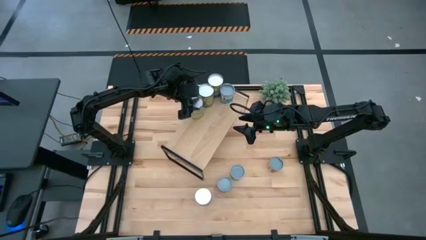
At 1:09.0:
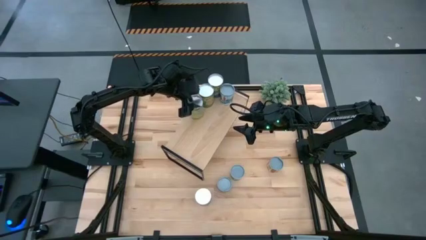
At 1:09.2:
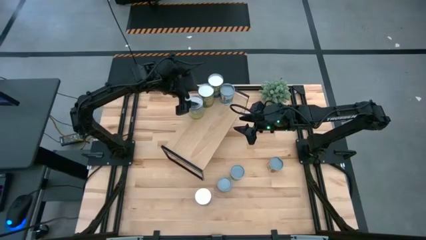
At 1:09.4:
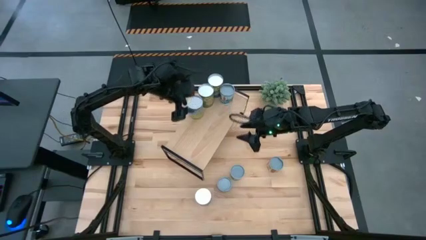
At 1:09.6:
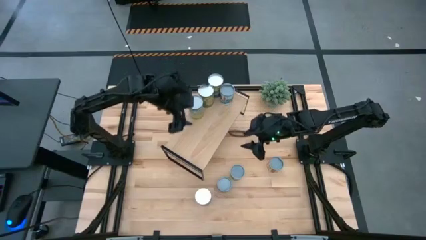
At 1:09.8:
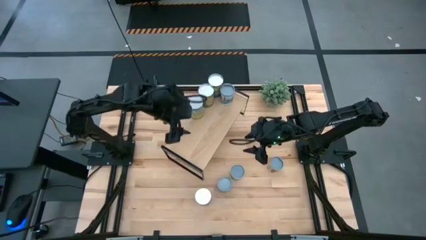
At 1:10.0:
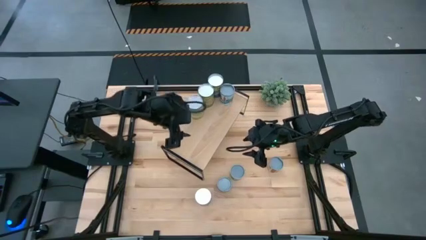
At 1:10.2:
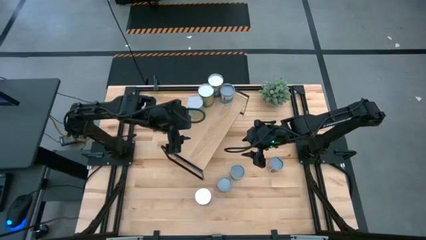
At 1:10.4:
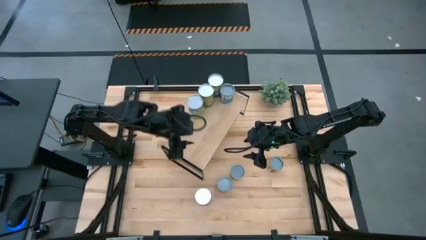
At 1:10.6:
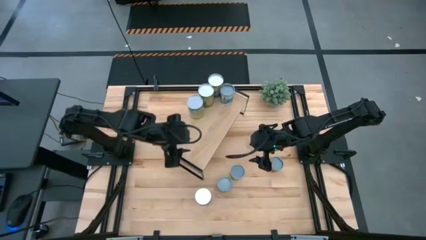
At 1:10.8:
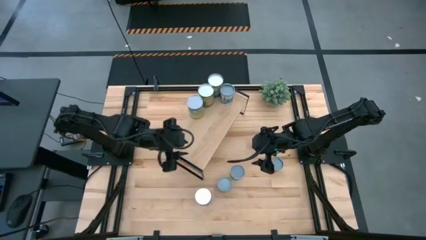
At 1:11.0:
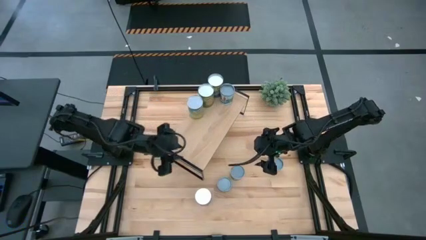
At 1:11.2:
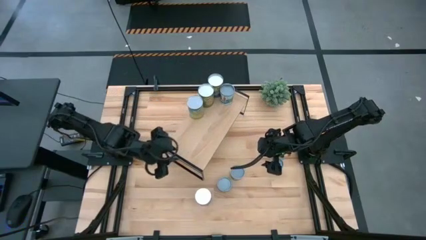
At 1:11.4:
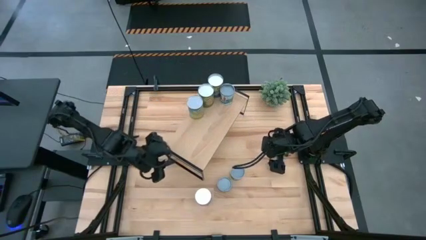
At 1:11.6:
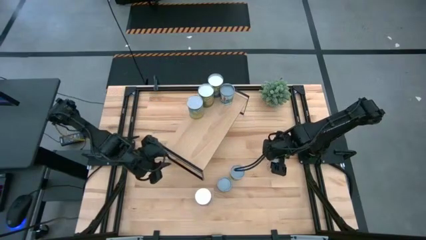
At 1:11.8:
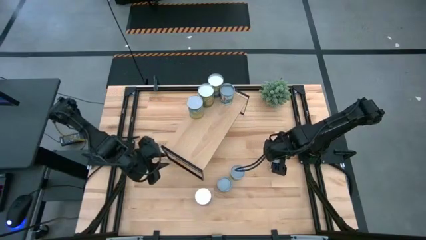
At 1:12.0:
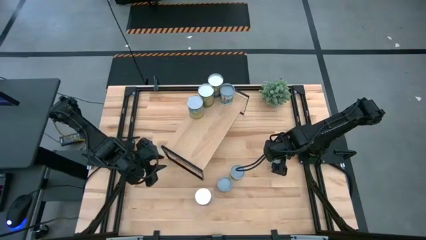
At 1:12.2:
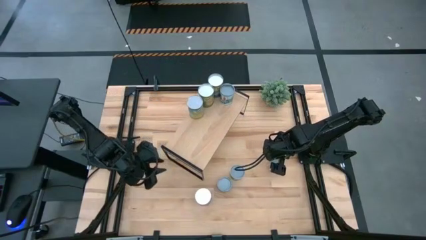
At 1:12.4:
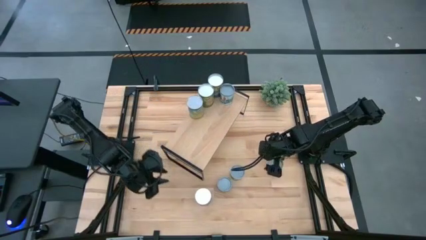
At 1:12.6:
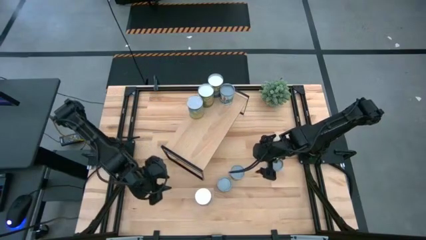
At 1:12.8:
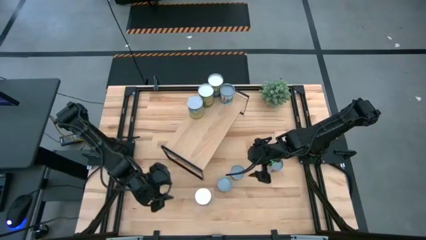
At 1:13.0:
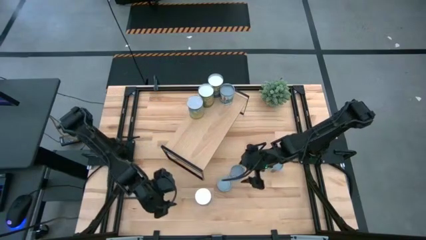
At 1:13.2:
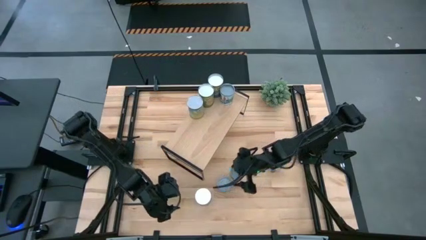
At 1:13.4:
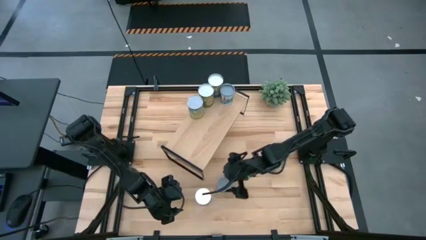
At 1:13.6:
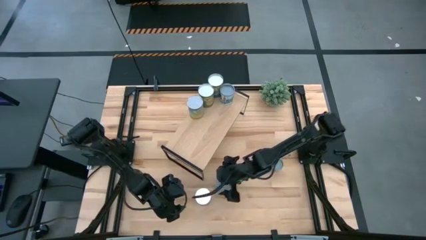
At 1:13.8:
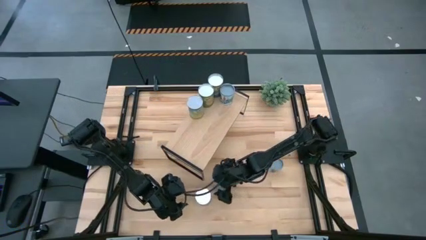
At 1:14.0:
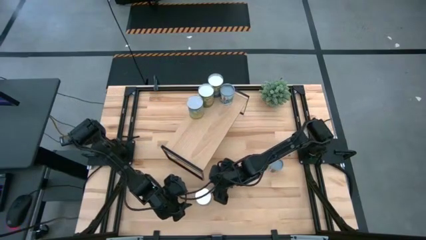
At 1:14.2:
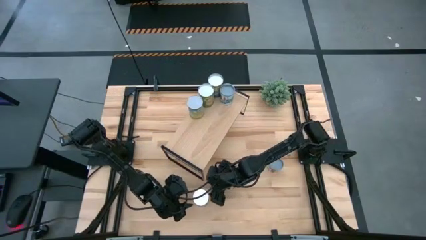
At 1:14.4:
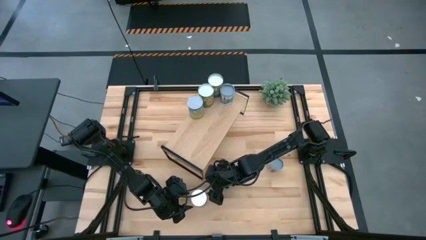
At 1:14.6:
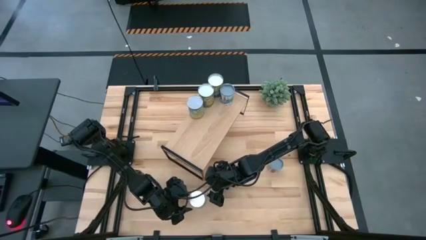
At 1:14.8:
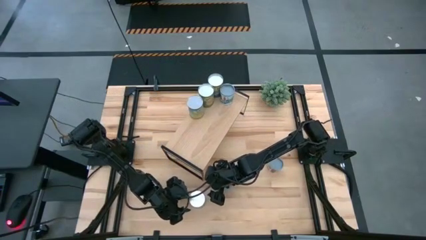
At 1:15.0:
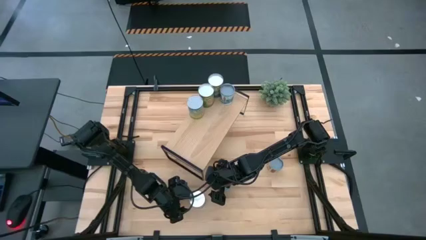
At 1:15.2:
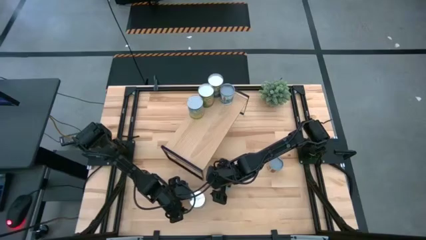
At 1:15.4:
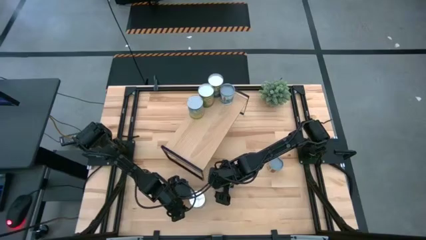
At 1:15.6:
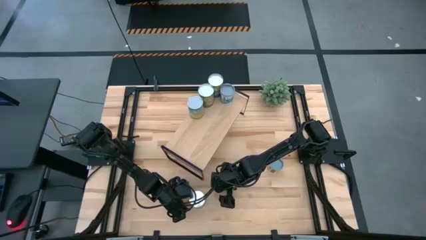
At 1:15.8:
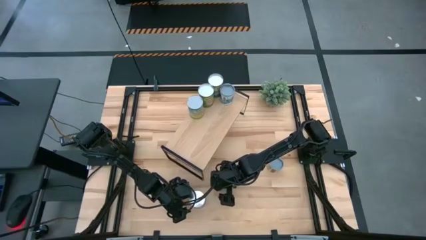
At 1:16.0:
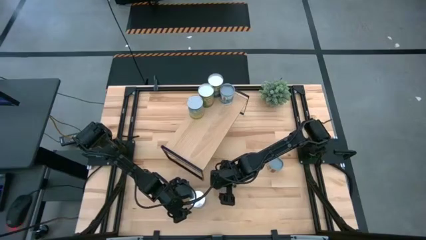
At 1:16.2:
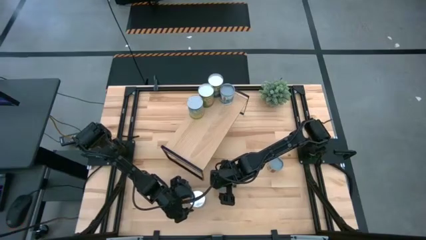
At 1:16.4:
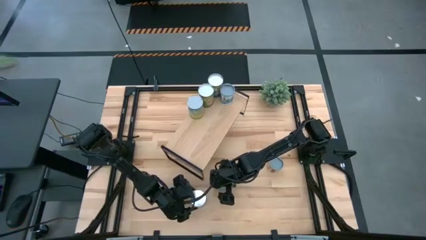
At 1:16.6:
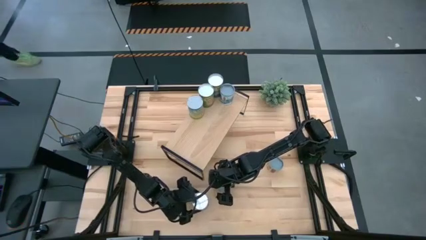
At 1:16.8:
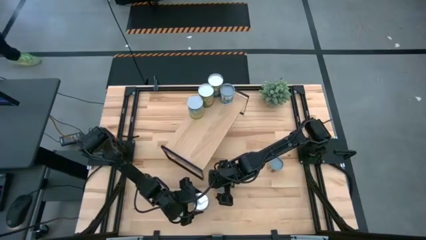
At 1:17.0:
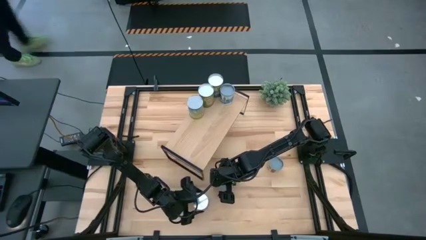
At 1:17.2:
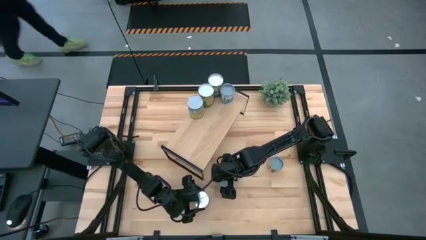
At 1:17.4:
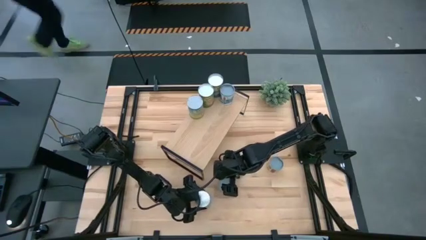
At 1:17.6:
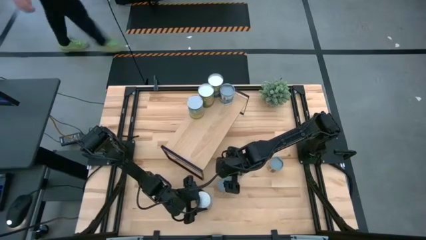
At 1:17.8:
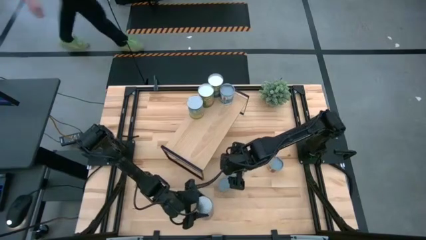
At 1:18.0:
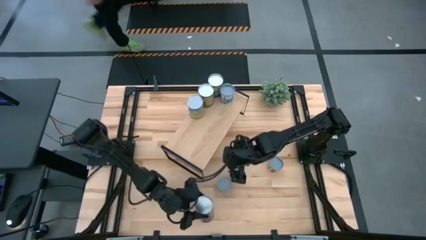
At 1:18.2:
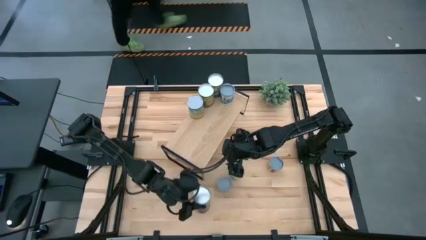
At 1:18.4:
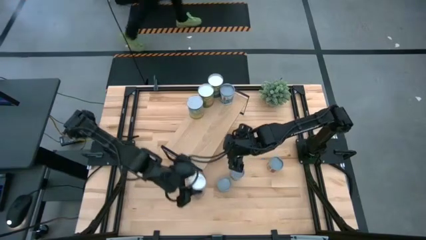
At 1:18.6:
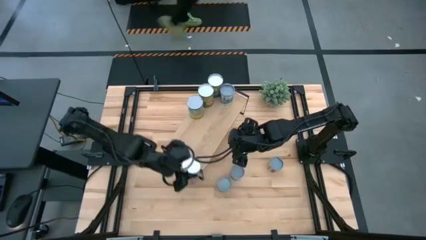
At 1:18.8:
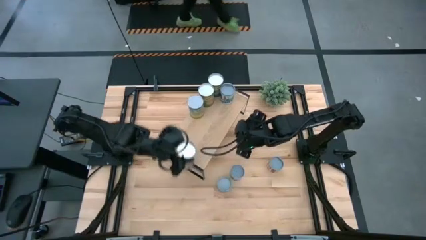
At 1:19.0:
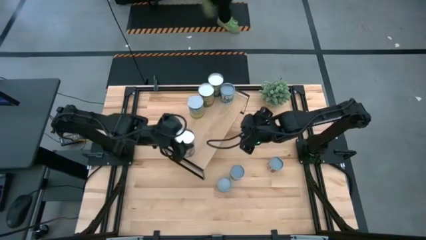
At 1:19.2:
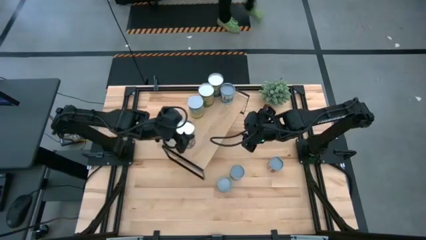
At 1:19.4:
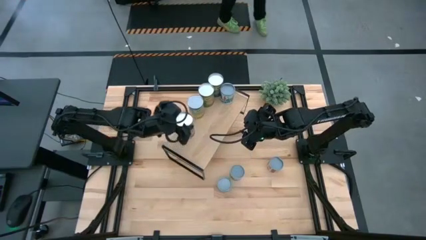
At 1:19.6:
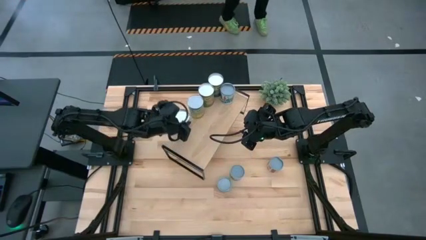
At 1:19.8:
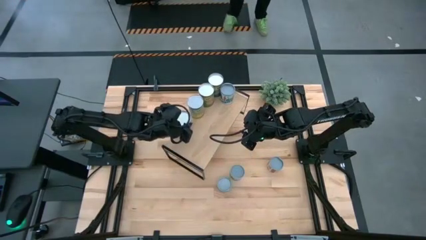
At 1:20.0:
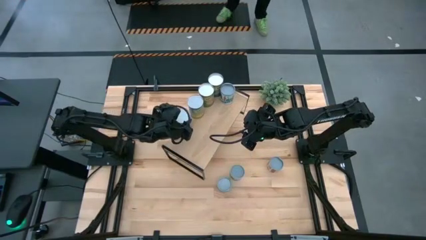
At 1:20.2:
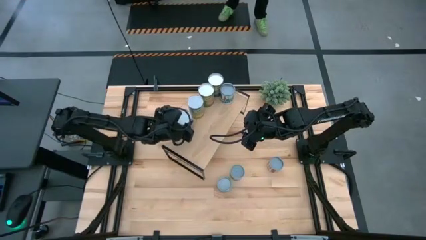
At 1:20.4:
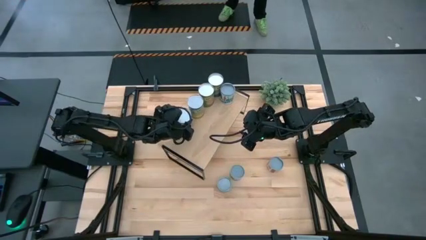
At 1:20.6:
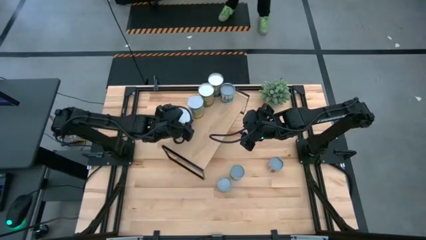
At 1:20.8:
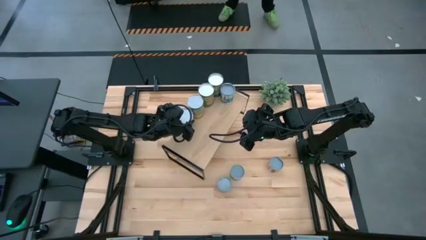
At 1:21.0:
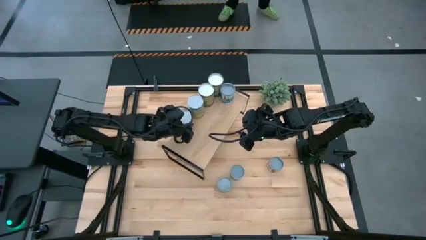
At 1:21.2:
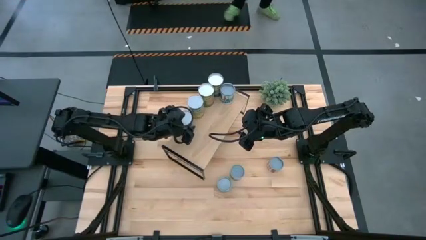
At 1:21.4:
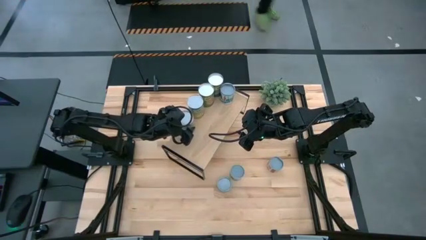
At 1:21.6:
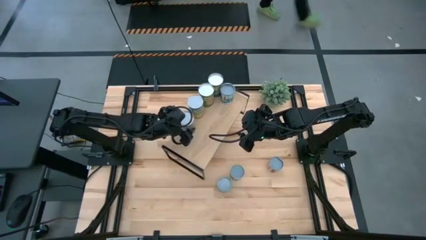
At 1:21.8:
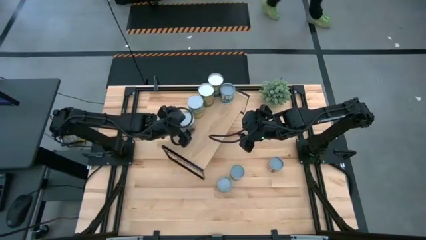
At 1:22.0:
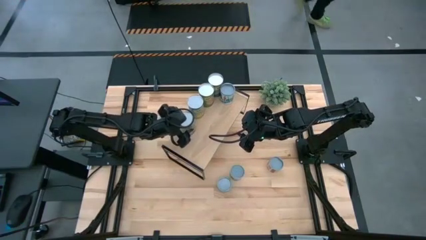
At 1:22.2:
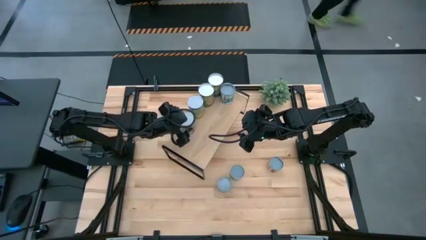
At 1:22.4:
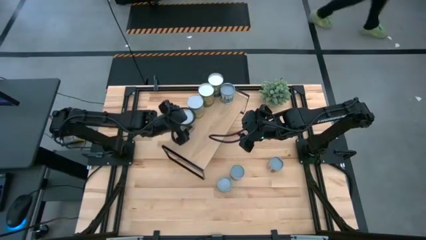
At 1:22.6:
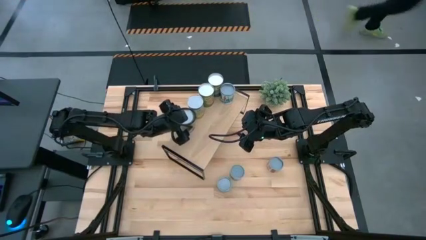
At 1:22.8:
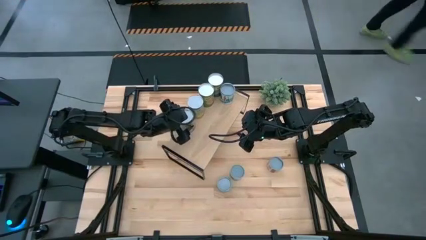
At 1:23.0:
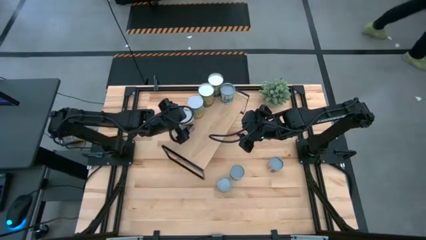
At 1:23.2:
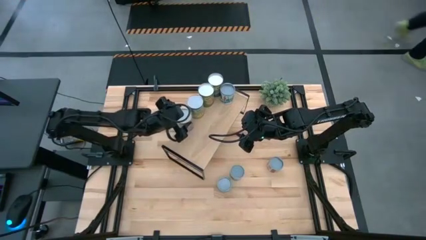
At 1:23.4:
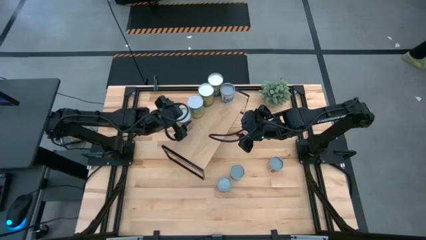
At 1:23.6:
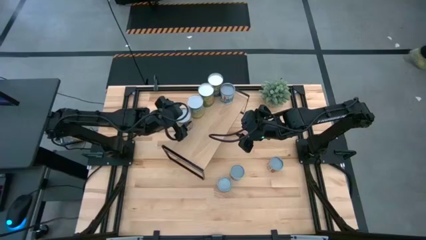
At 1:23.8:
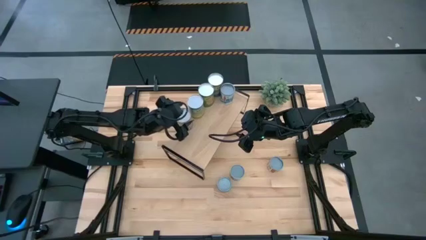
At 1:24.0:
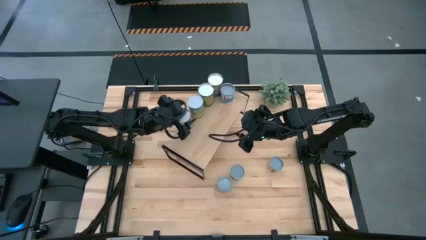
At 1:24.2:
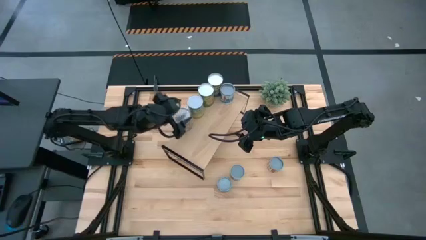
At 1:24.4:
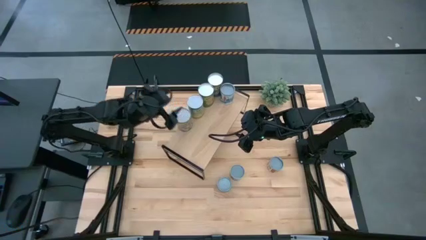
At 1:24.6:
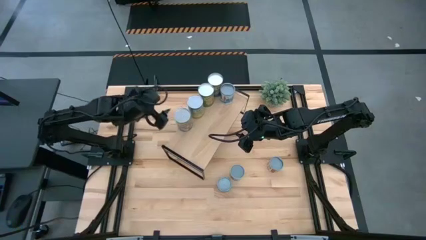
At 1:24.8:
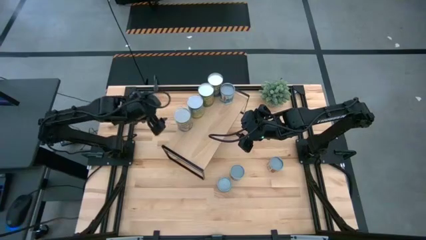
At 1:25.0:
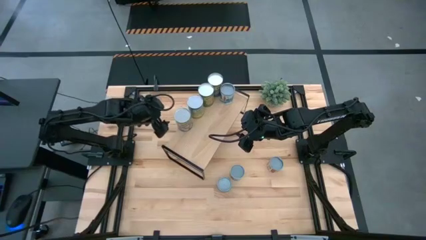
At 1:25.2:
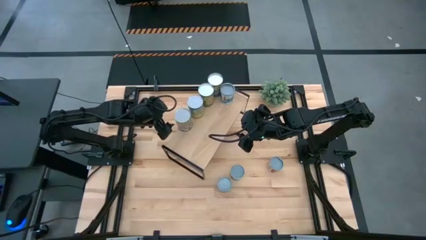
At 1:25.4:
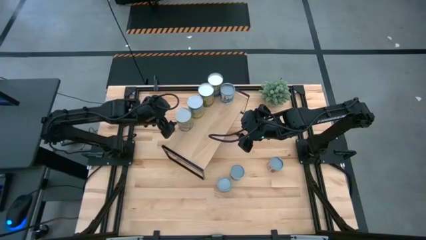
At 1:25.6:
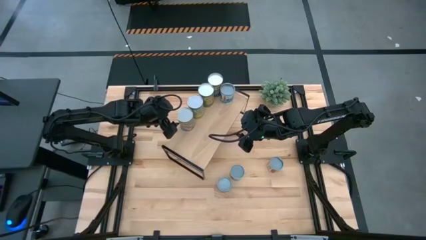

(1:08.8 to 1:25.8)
Task: Pick and place cans onto a shelf
Put the canned peaches on the shelf
